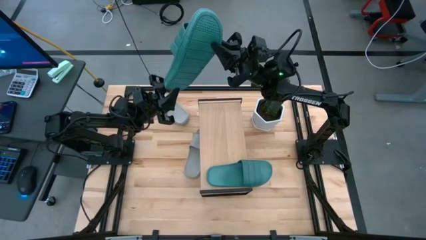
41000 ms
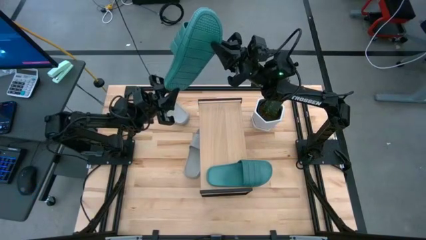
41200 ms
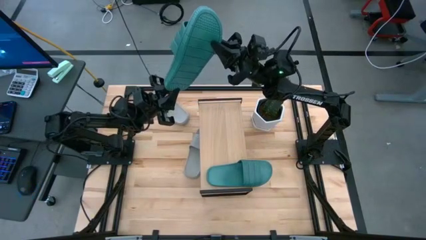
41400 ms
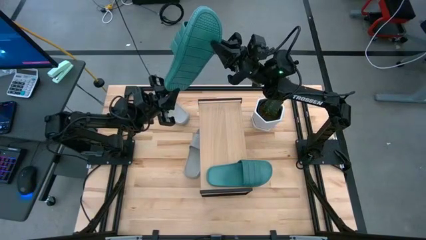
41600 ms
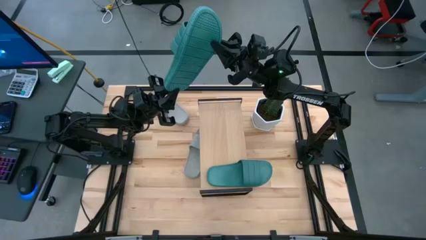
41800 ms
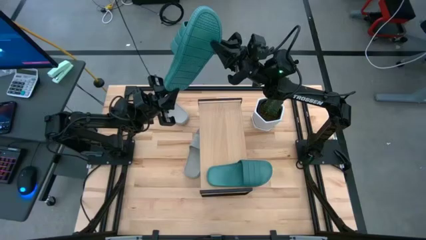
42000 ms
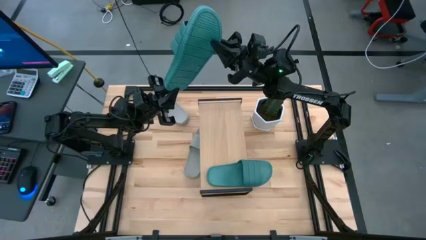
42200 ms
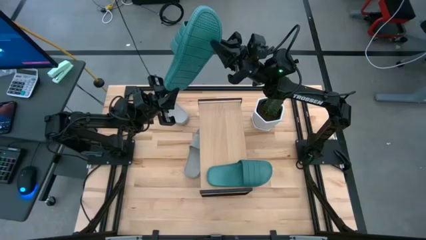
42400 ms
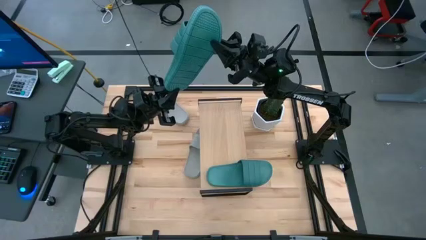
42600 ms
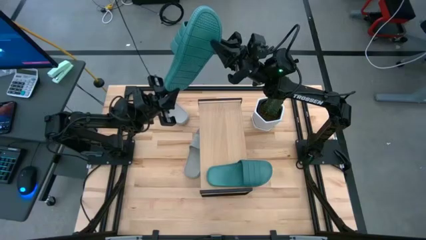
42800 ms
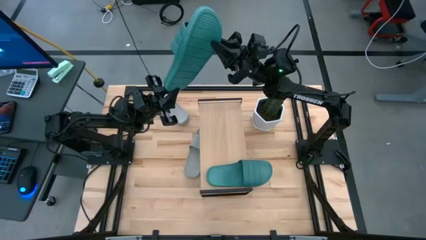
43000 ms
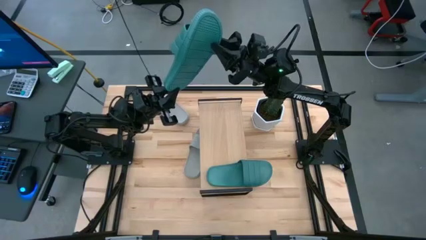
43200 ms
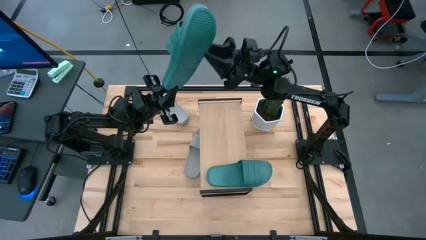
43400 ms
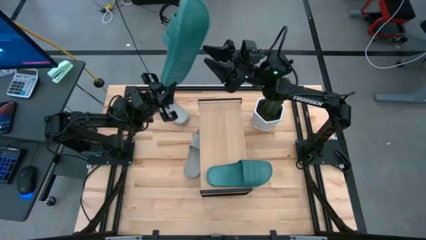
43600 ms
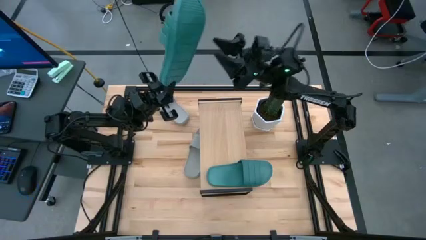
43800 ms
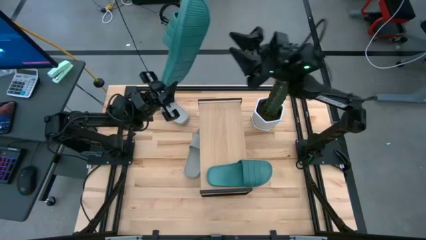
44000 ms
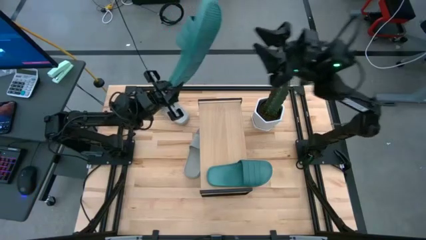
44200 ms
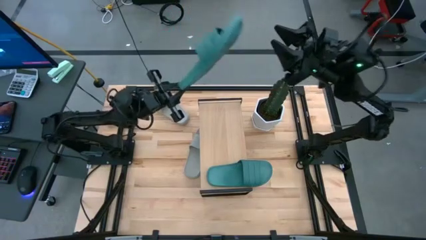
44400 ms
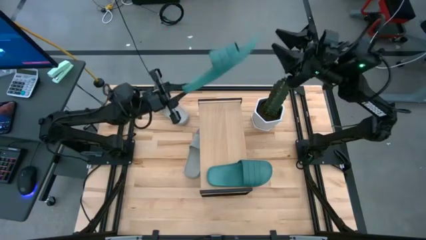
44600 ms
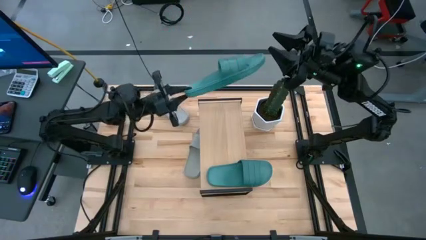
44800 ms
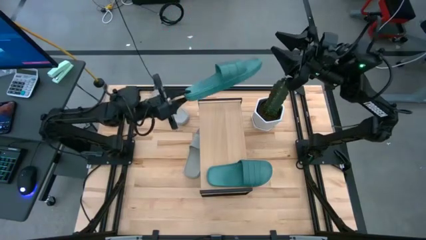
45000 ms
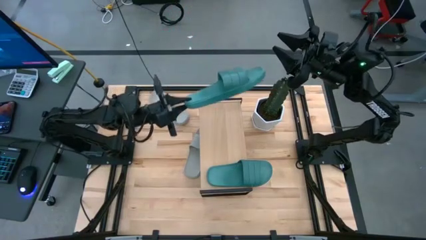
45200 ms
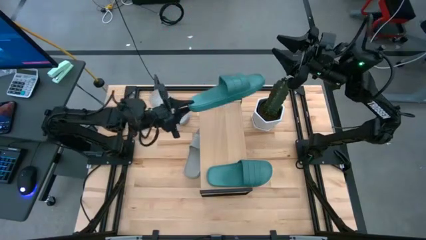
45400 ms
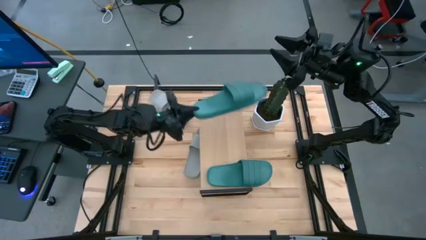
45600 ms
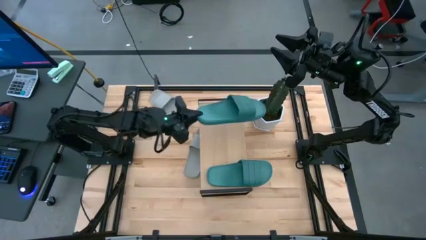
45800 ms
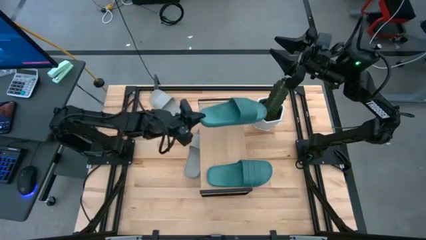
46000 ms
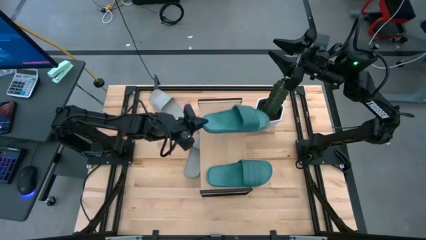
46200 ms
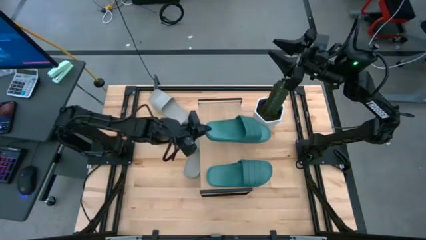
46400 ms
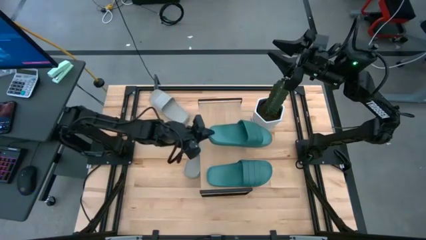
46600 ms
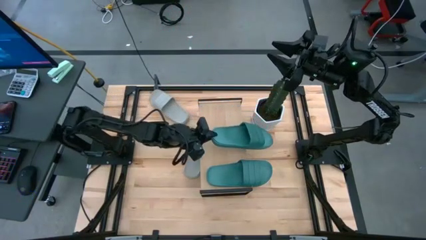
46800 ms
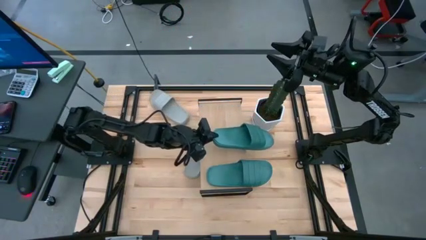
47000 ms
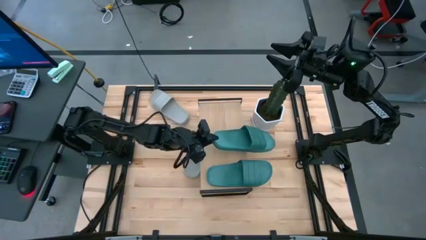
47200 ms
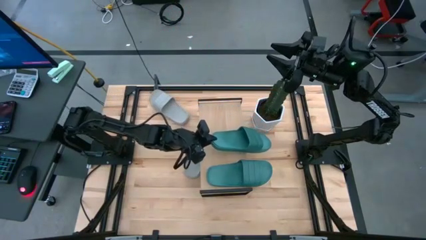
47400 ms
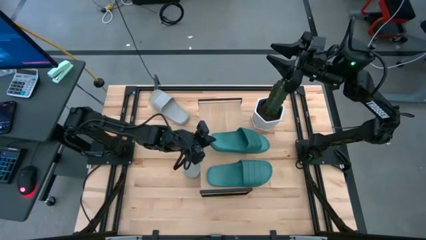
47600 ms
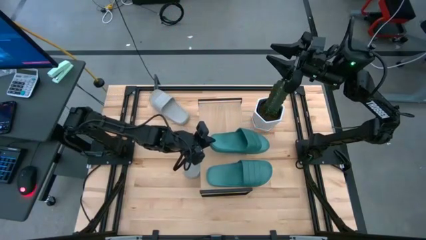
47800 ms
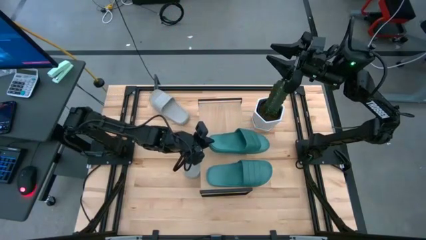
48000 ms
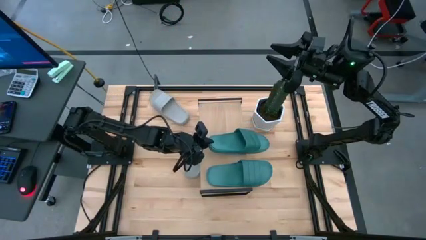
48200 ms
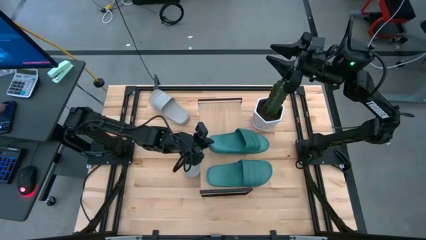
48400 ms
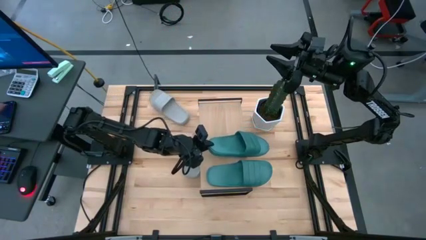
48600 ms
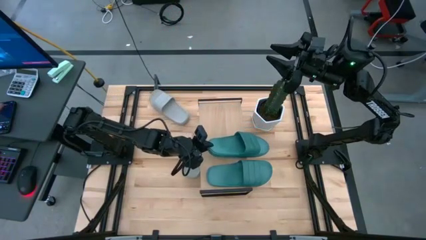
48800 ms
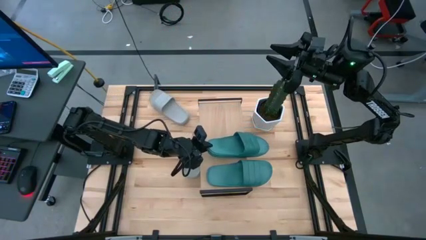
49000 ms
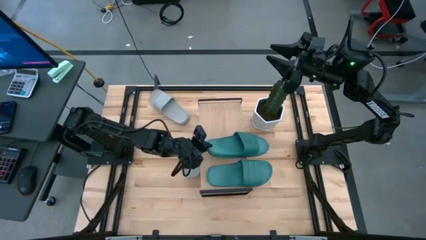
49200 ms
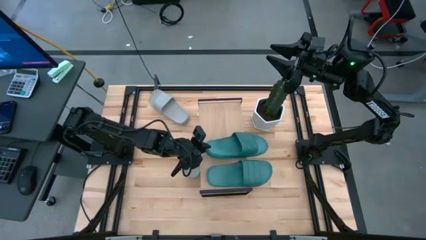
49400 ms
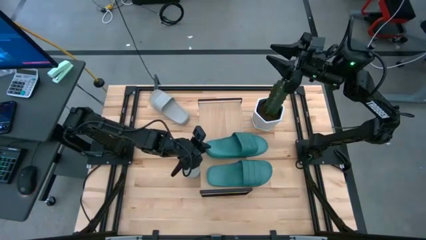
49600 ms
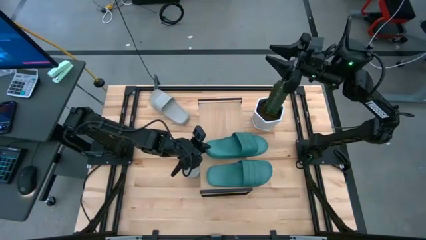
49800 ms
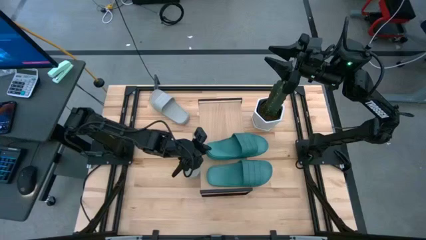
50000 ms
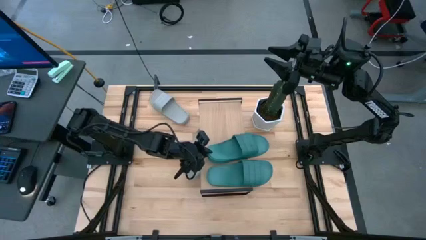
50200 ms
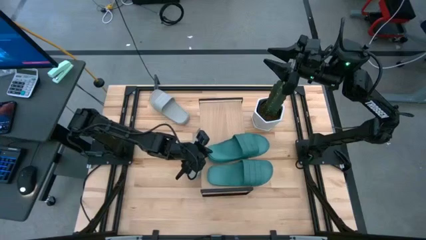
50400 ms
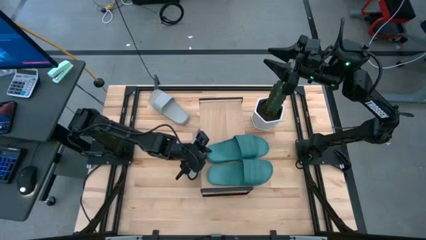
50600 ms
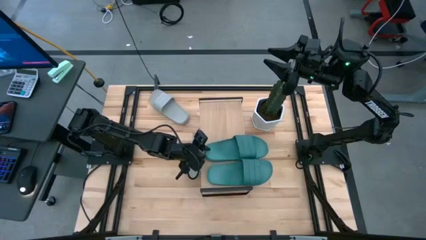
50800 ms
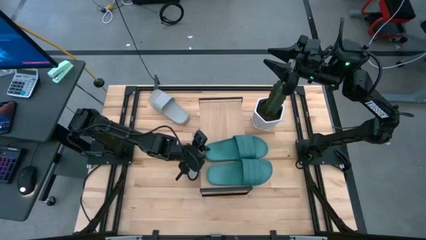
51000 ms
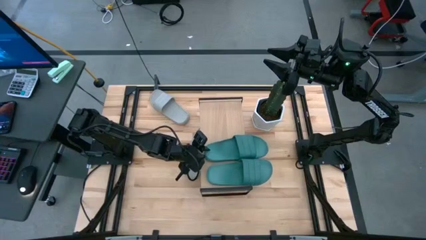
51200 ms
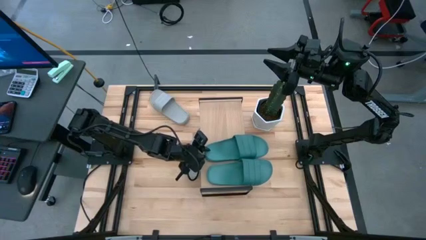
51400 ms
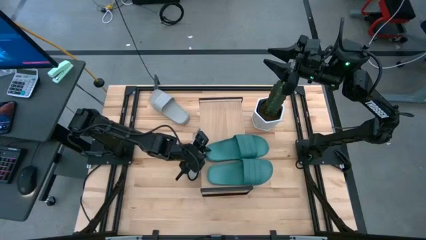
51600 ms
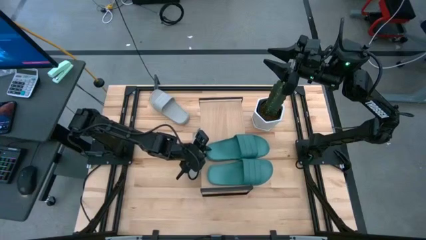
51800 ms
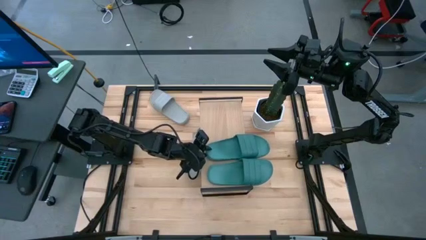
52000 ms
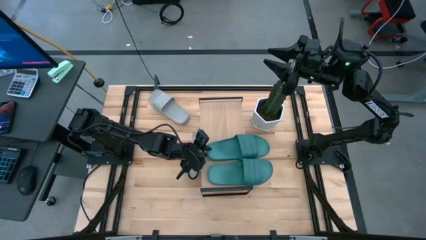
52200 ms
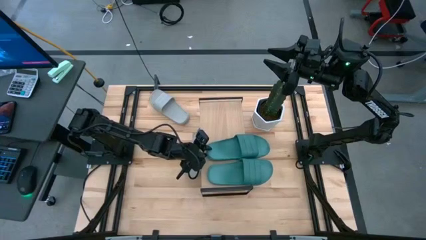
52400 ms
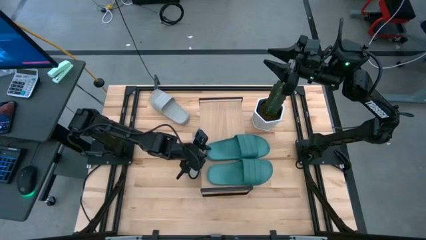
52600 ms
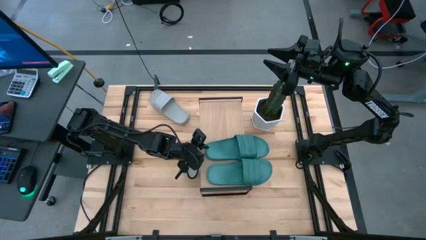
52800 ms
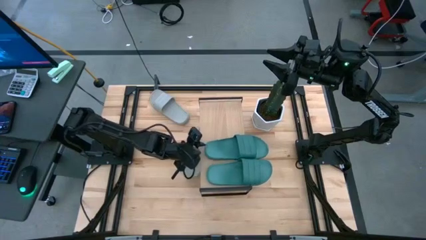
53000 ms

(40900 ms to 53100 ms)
Task: Pick and place slides into the shelf
Put the green slide on the shelf
